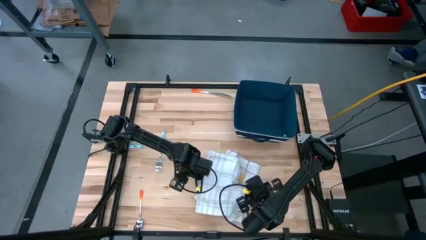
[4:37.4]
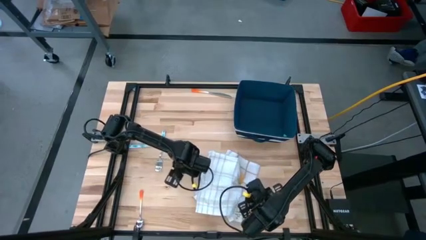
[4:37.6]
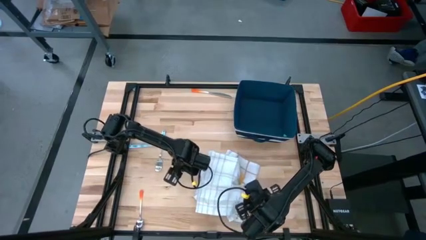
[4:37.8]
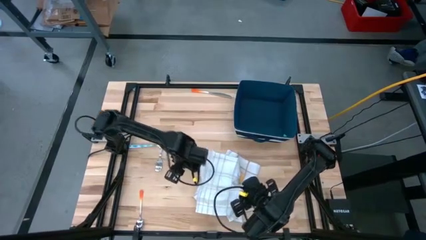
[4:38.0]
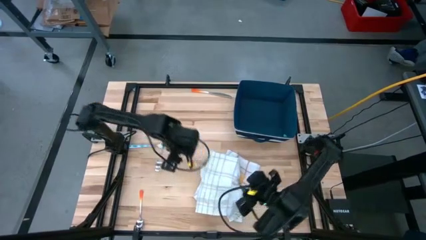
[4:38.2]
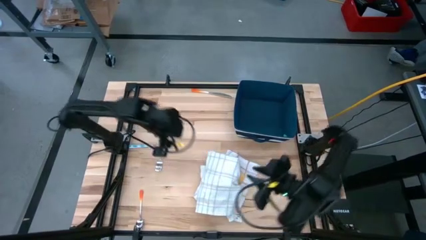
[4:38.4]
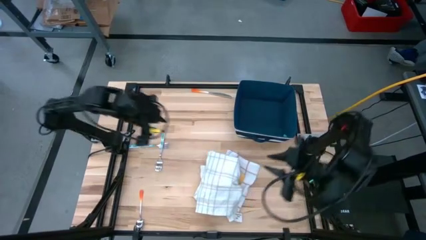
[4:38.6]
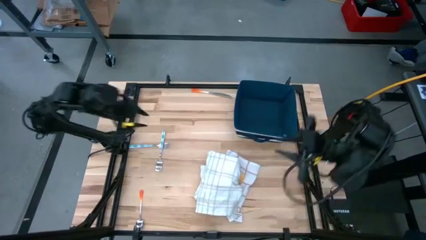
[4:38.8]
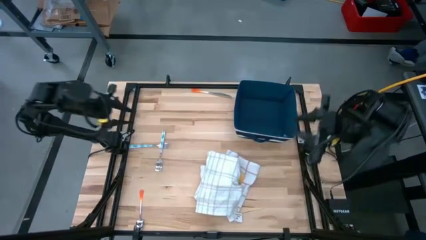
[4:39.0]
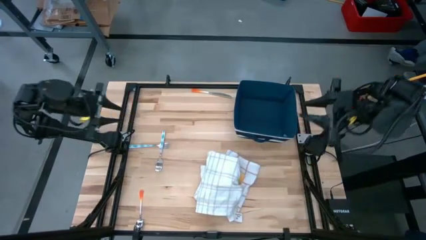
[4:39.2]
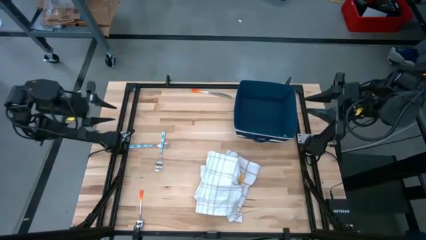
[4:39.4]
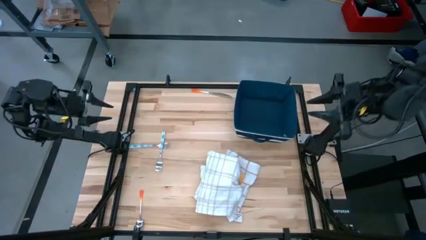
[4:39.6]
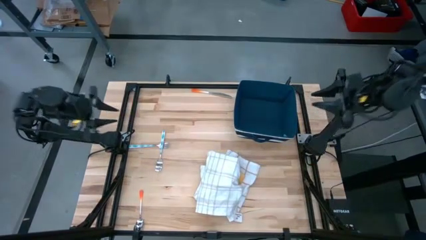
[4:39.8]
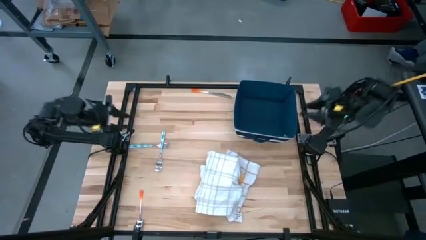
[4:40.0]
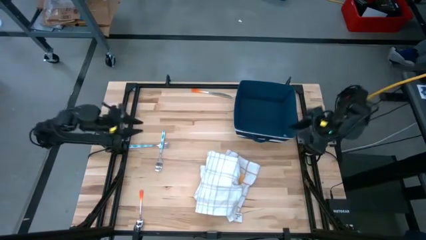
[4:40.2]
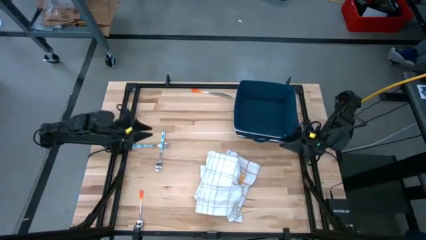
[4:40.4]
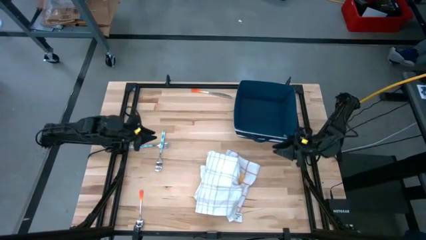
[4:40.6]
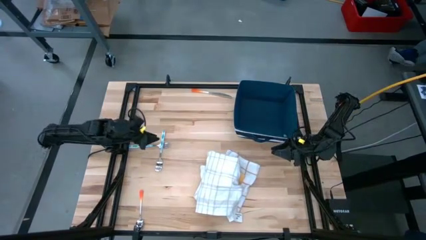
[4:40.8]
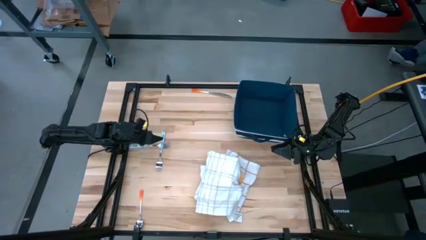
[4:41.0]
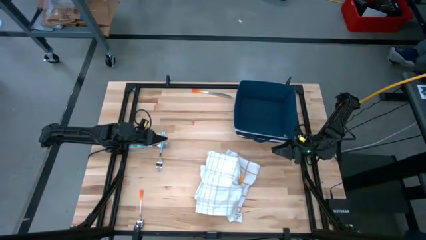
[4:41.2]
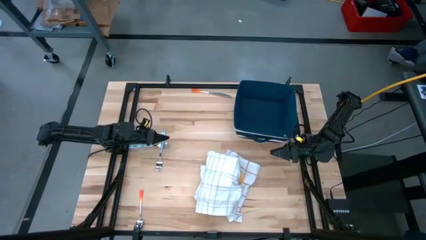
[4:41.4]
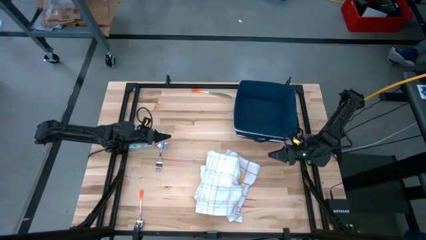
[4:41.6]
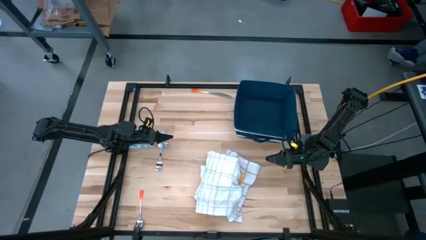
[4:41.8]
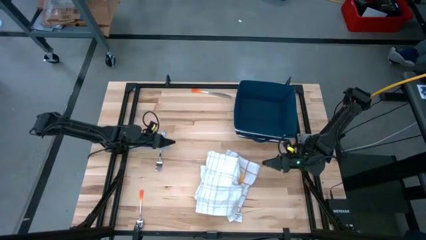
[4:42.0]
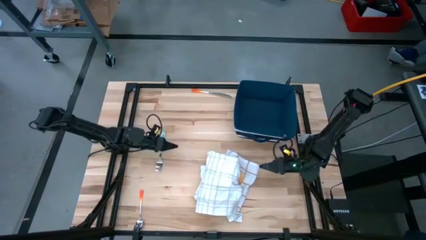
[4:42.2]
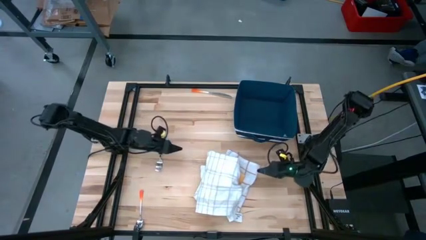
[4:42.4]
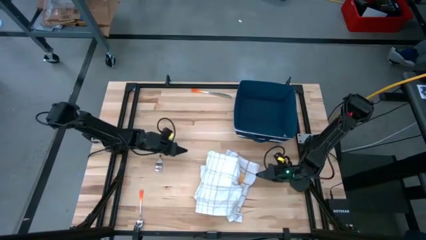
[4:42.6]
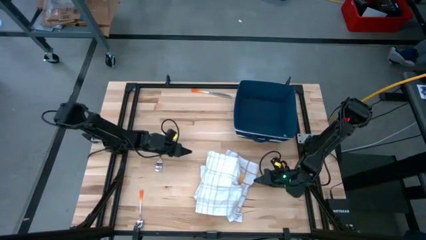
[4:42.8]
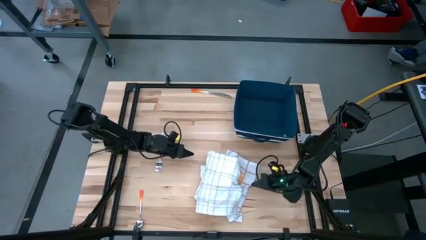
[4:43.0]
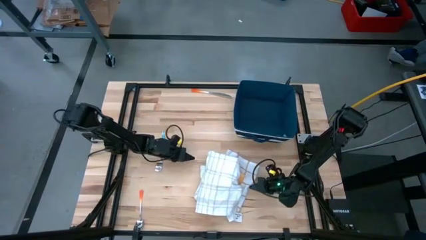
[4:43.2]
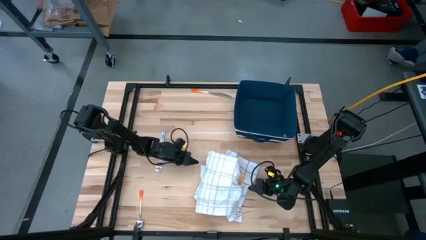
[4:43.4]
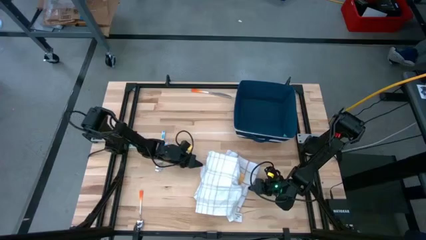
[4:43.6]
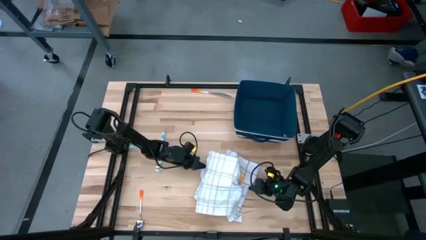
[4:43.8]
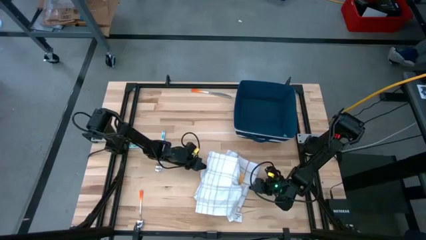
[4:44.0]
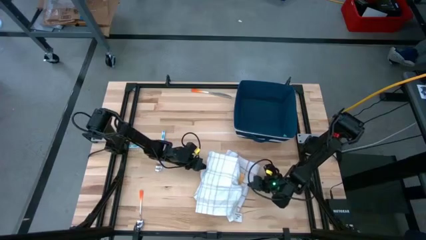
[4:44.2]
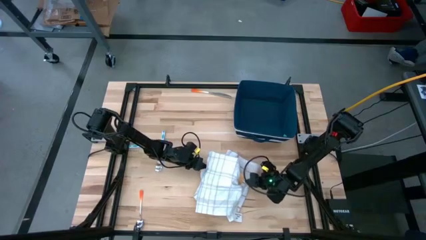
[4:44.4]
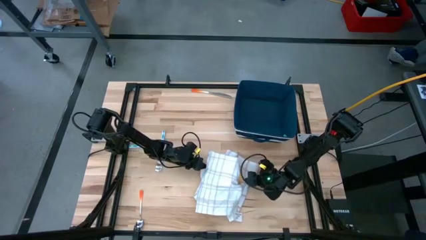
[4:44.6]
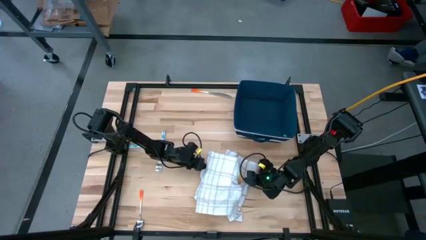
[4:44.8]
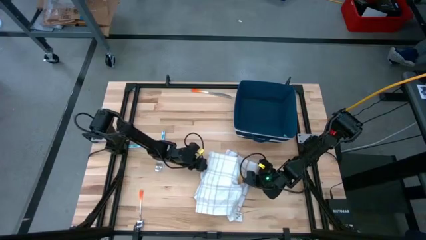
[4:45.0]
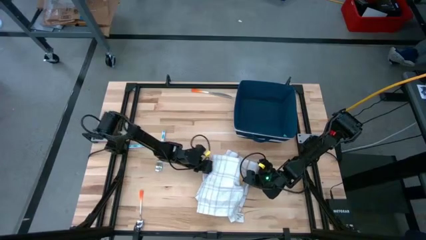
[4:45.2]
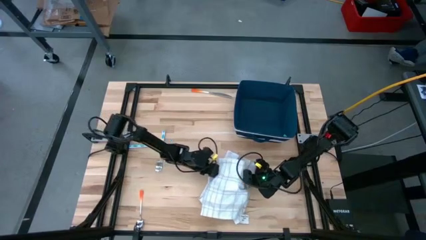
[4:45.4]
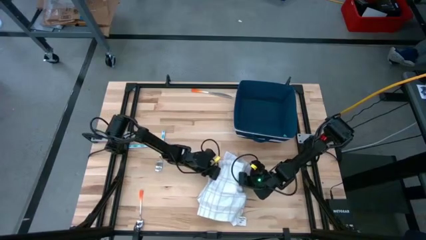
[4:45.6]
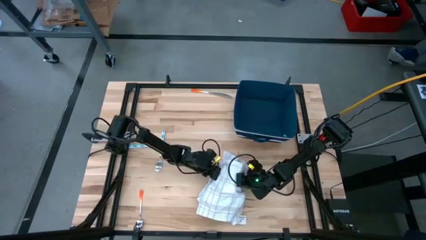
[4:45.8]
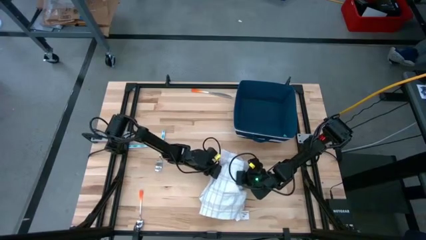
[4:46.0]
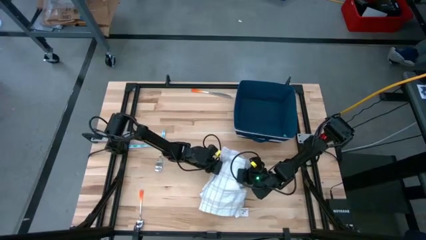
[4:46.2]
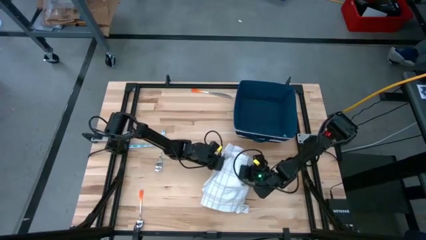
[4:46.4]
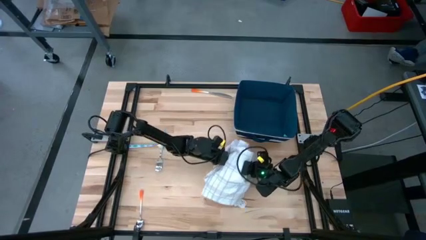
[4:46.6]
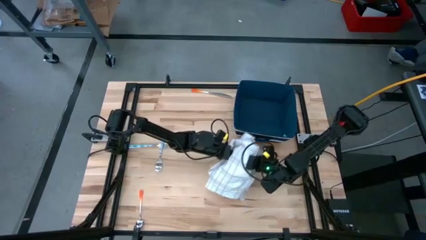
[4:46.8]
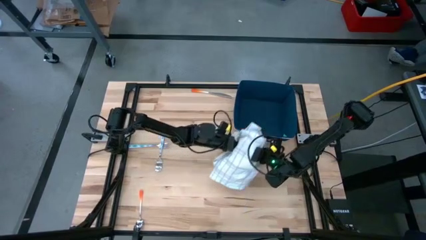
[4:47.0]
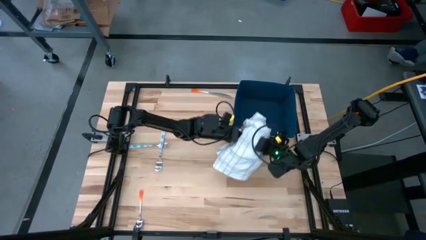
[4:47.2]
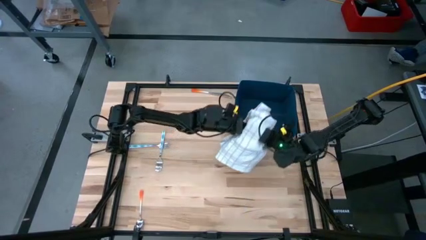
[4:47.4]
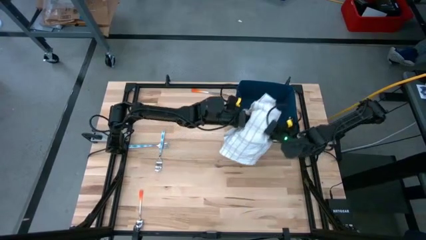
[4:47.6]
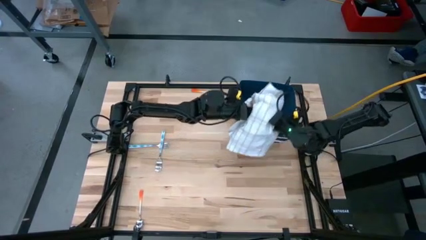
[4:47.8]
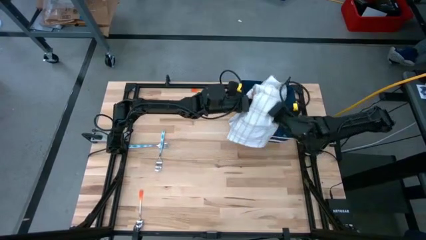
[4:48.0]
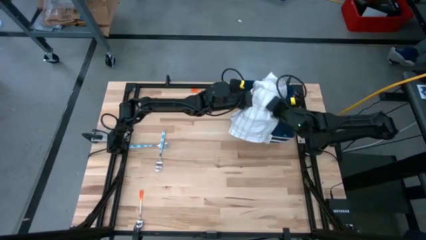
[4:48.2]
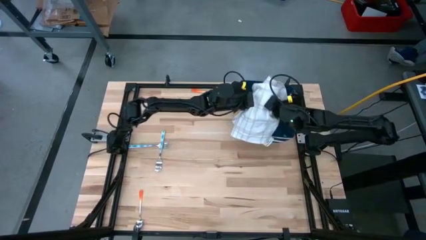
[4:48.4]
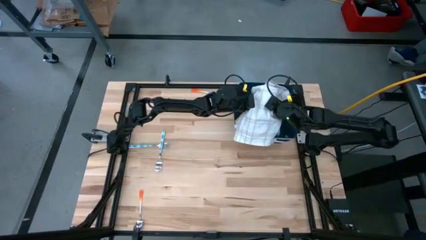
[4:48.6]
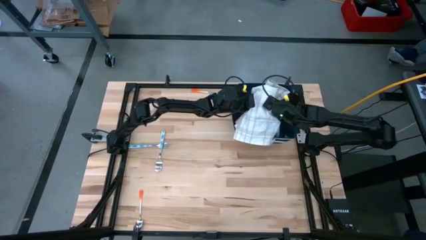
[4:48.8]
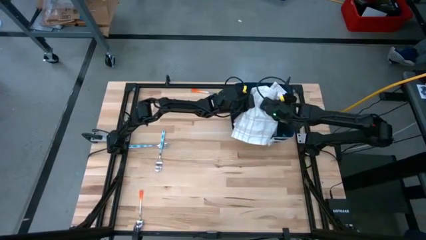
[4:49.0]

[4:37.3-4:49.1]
Task: Fold towel
Put the stacked and folded towels into the blue laundry bin

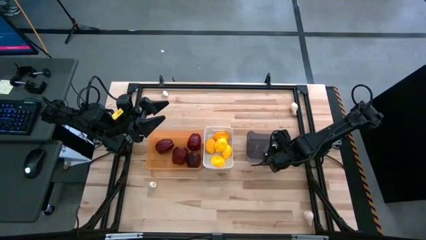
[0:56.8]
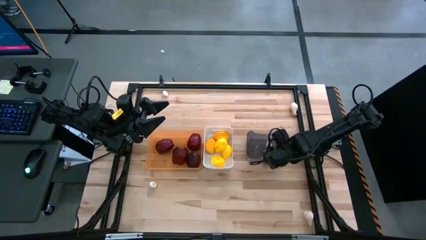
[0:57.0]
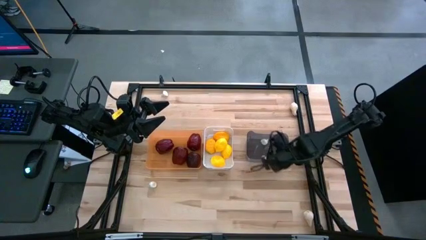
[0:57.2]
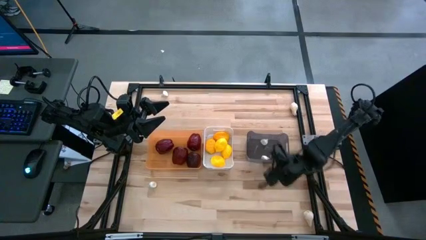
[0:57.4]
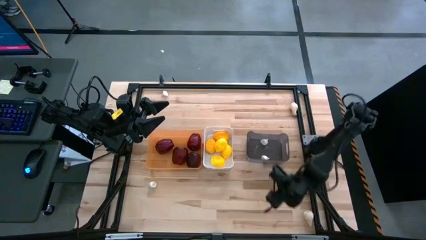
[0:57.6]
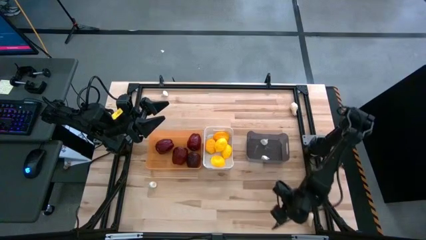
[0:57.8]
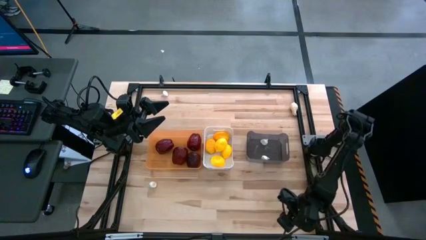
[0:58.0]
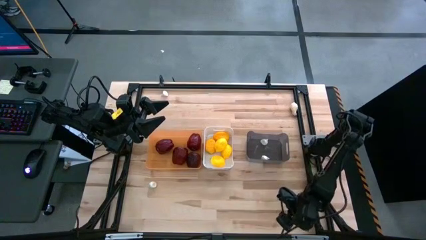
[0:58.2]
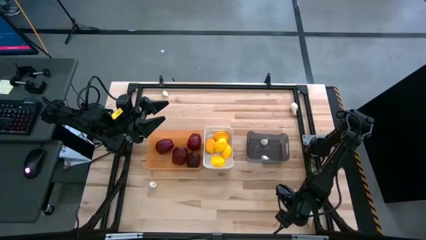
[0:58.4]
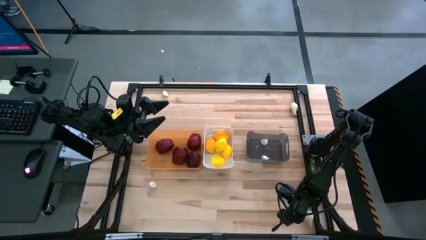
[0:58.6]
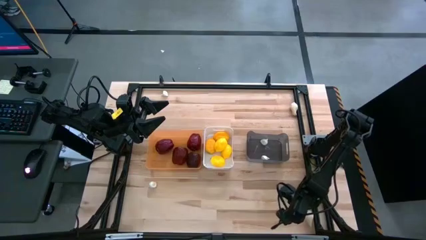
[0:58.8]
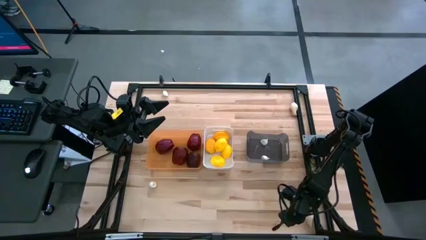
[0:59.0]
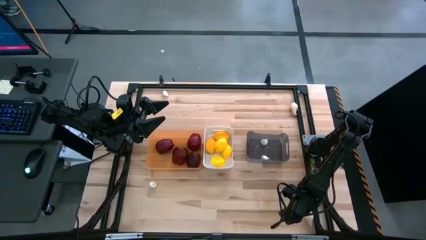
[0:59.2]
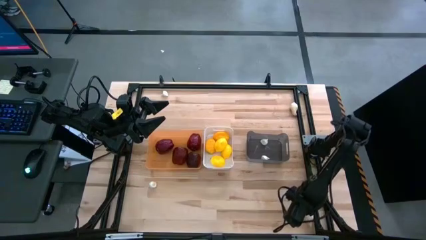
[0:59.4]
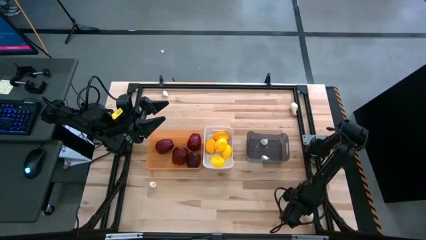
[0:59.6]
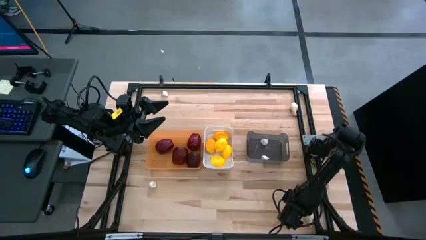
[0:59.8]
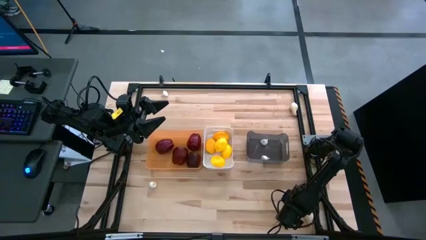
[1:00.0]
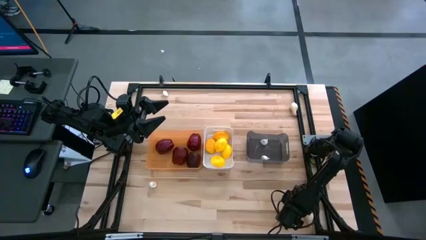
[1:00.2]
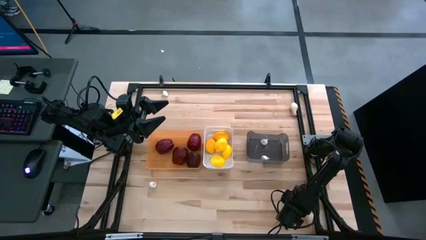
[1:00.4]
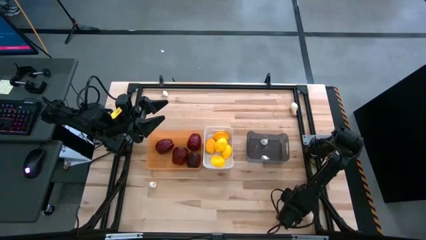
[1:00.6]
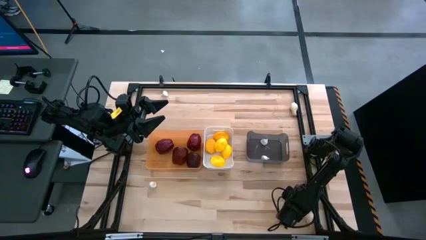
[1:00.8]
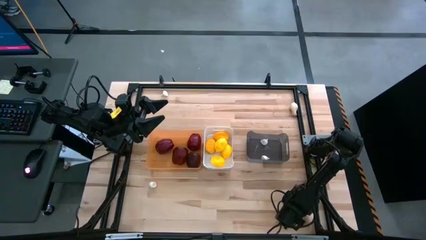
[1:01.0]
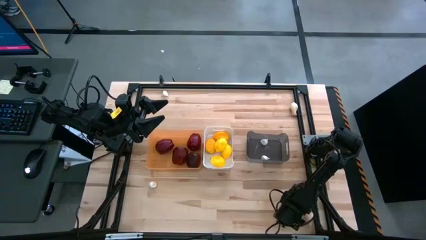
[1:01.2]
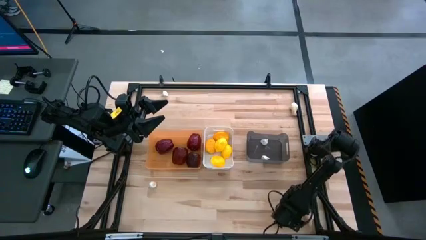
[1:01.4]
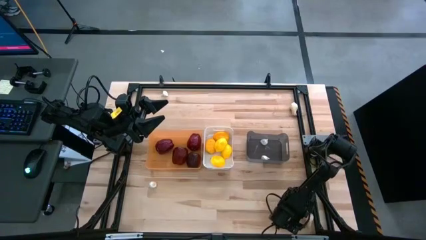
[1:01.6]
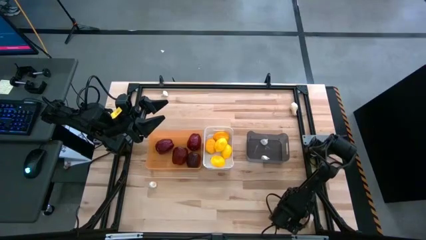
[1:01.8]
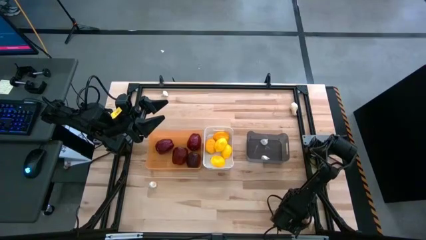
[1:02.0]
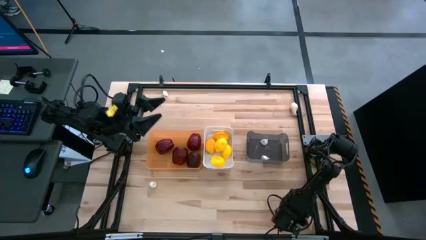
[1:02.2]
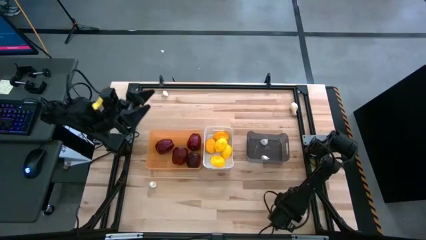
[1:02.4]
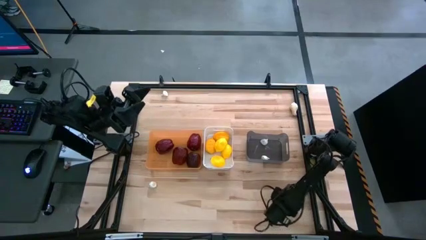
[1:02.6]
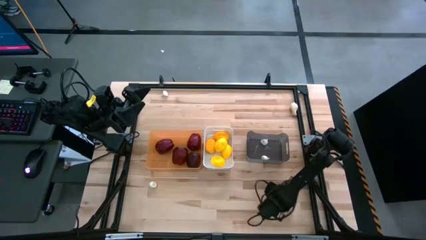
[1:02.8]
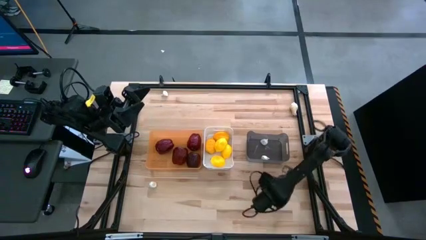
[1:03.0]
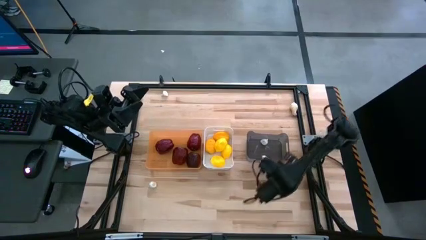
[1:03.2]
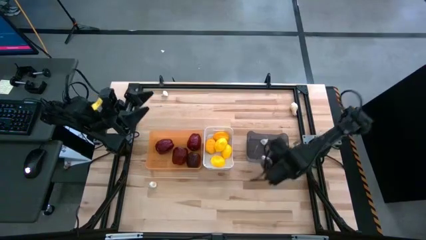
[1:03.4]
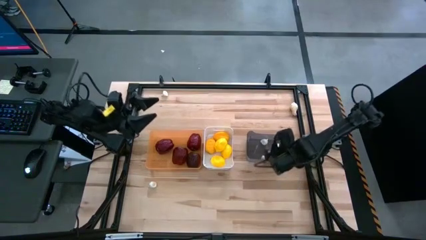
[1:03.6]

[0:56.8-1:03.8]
Task: Sort produce into baskets
Put the white garlic into the black bin
